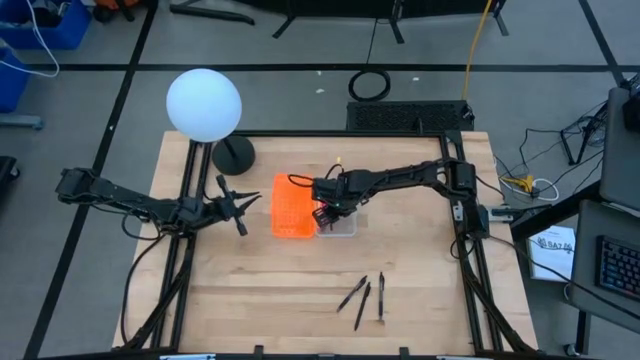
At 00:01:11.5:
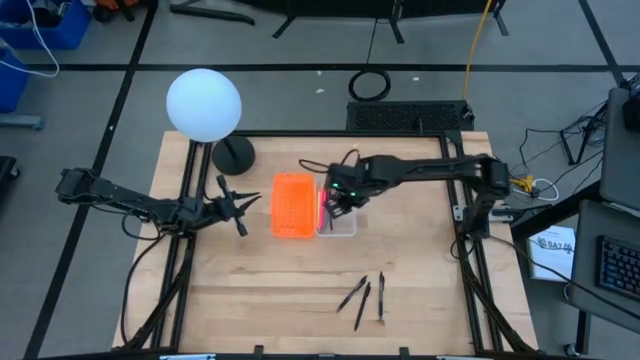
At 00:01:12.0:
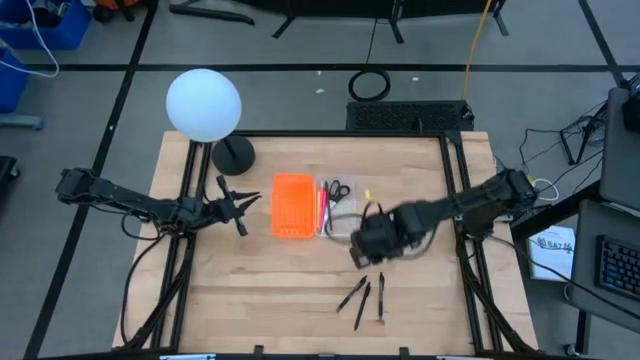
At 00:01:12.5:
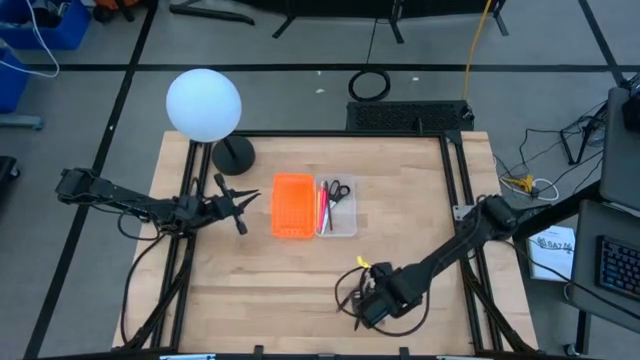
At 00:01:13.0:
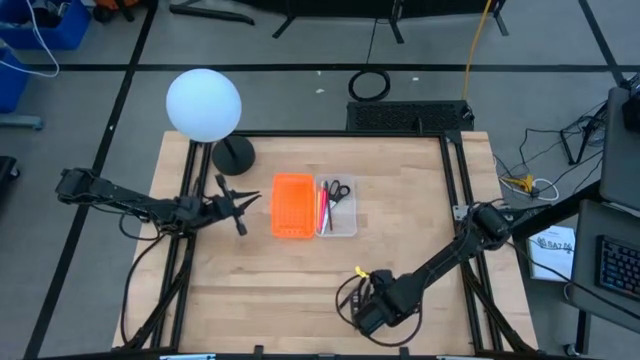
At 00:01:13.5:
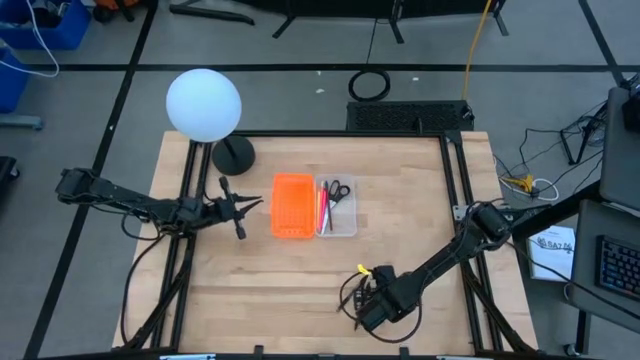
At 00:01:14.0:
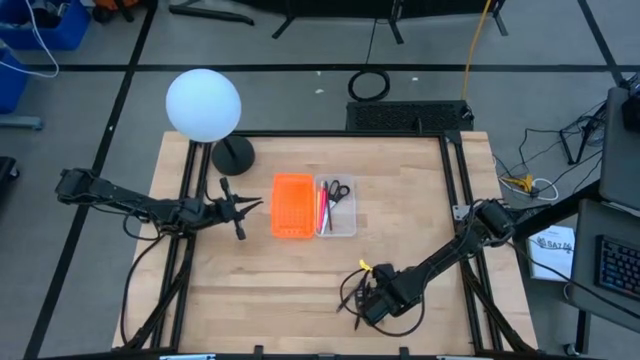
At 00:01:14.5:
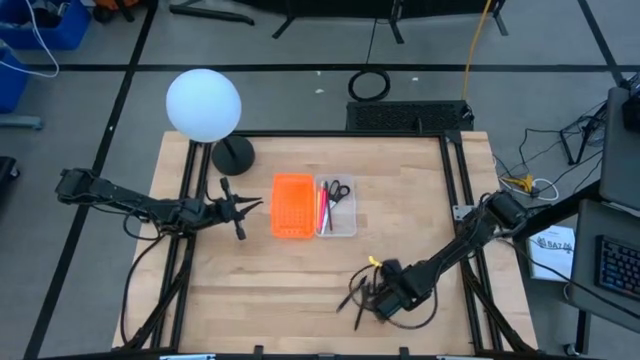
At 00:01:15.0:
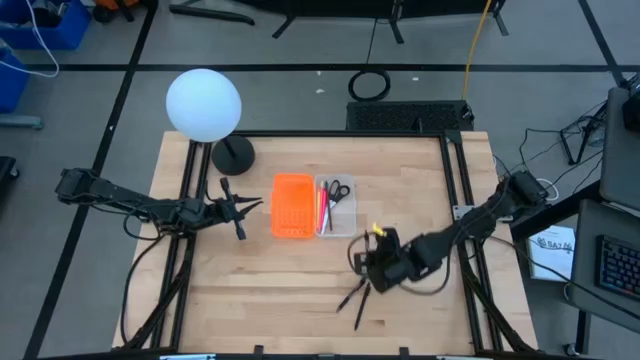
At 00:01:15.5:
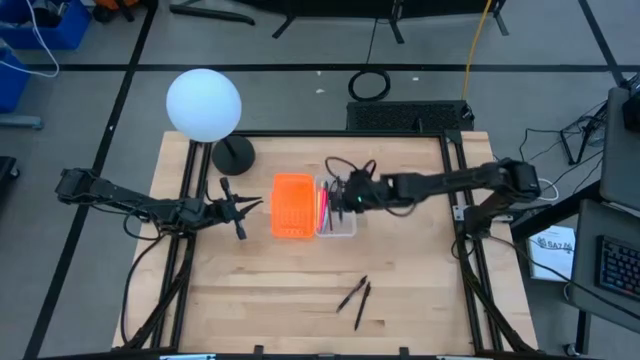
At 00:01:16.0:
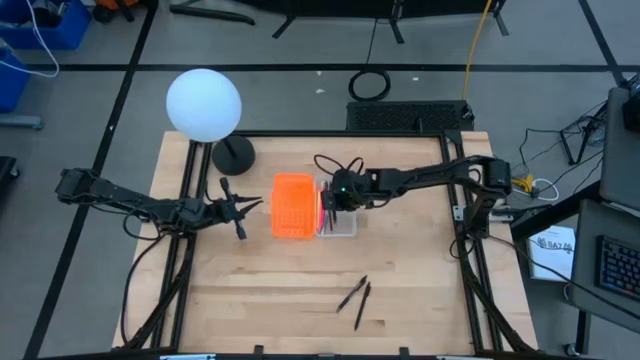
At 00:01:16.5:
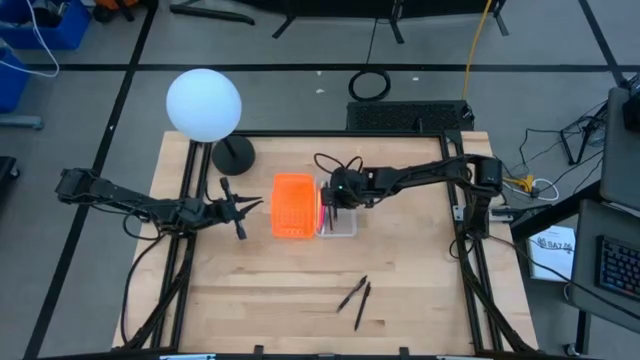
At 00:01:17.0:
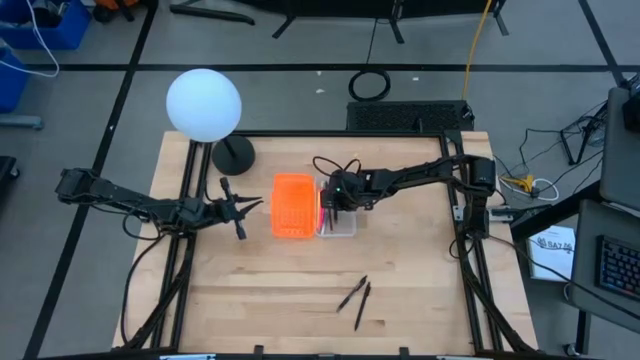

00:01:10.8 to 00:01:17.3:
Task: Pick & place school supplies into a supply box
Put the black pen into the orange supply box

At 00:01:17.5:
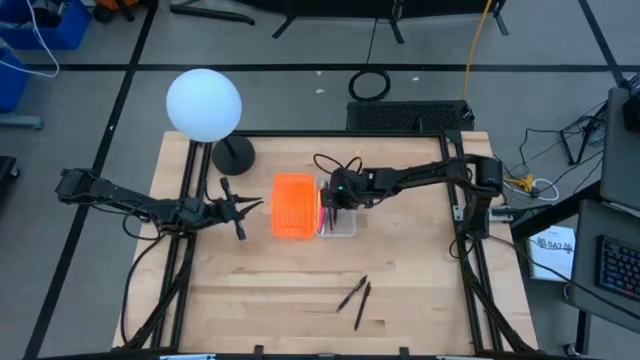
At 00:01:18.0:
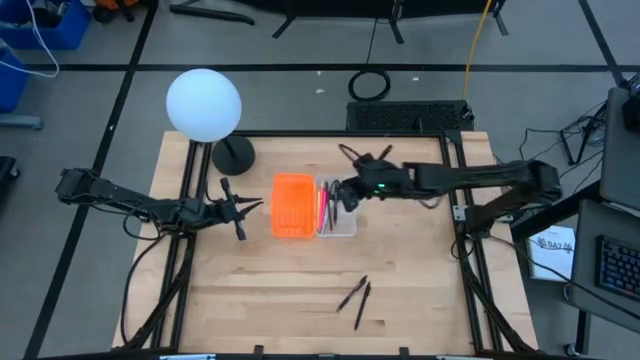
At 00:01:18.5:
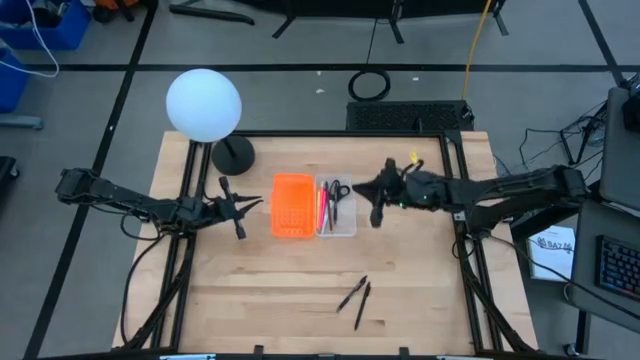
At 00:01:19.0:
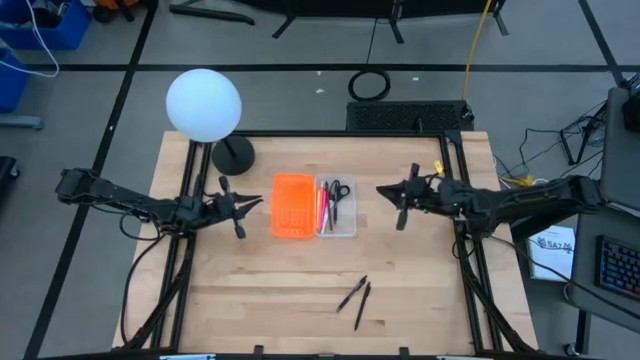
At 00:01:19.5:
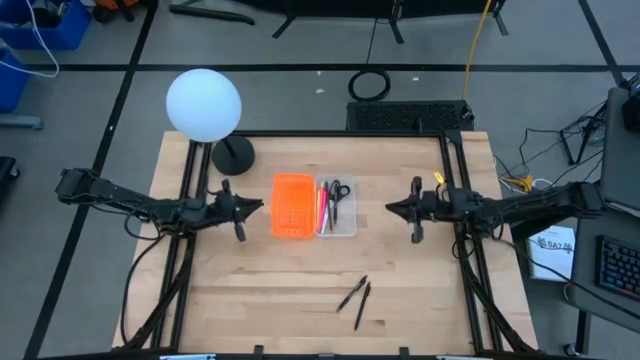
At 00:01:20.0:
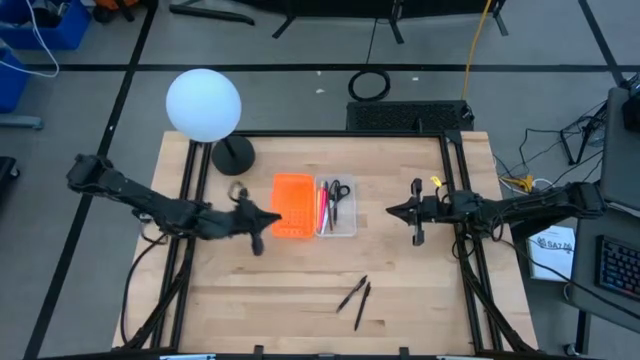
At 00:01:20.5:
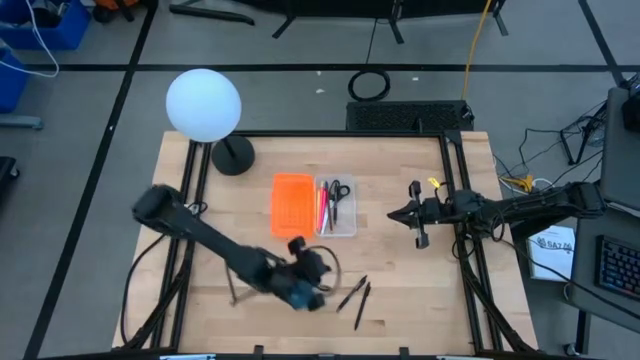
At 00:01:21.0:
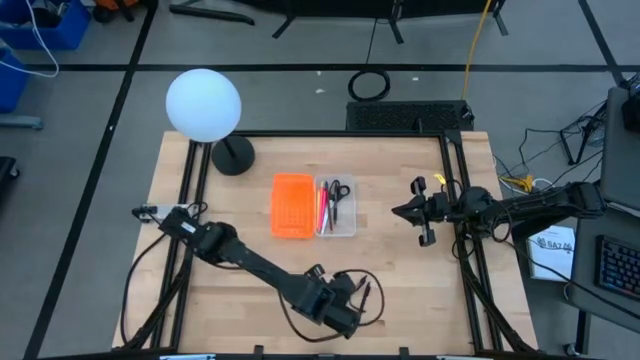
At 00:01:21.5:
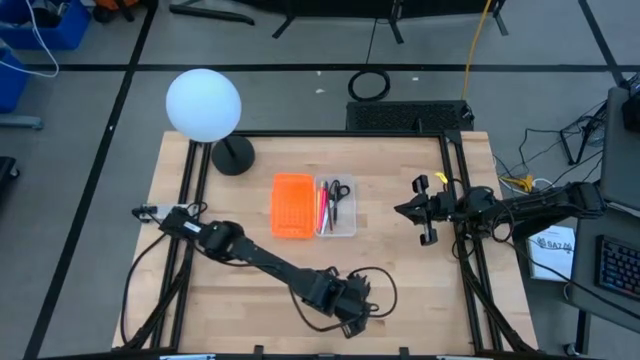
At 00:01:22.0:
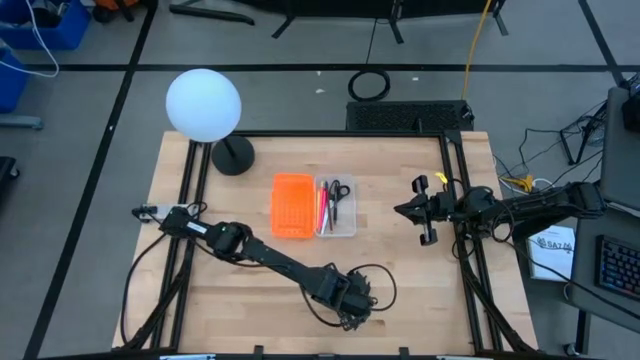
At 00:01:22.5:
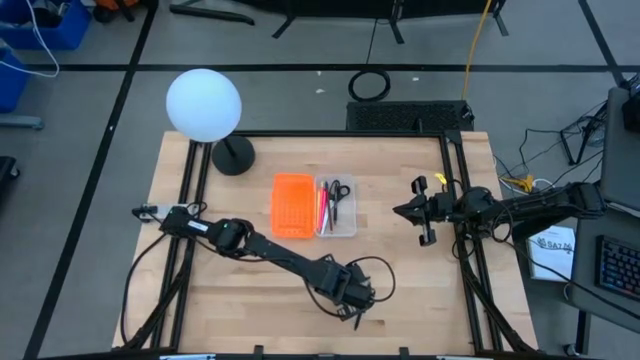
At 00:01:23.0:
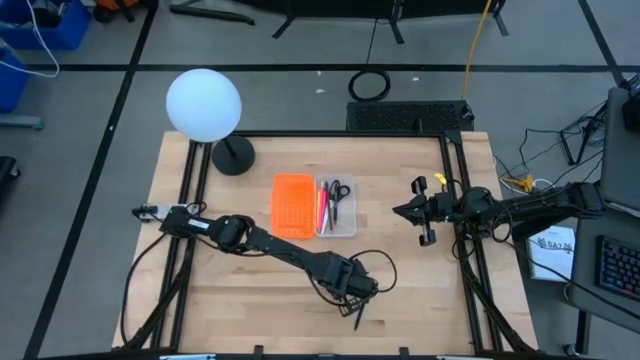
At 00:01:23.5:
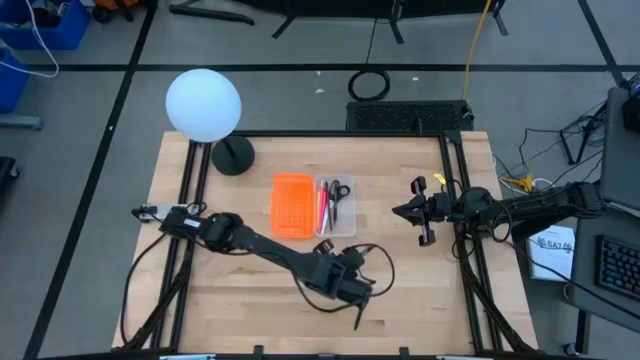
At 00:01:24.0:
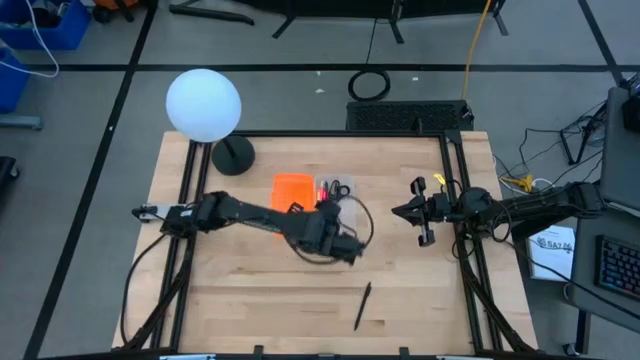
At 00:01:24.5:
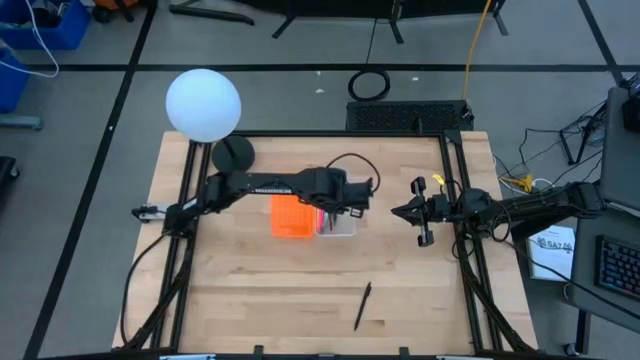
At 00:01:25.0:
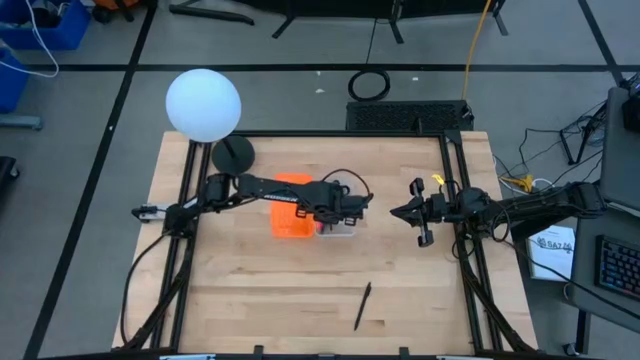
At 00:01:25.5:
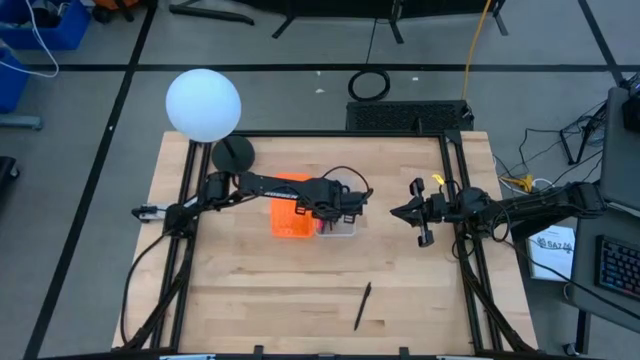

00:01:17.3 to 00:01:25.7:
Put the black pen into the orange supply box

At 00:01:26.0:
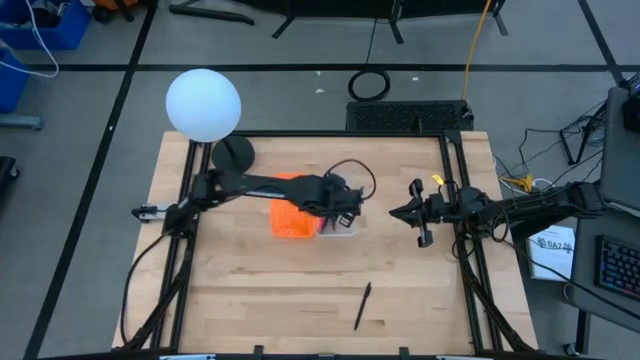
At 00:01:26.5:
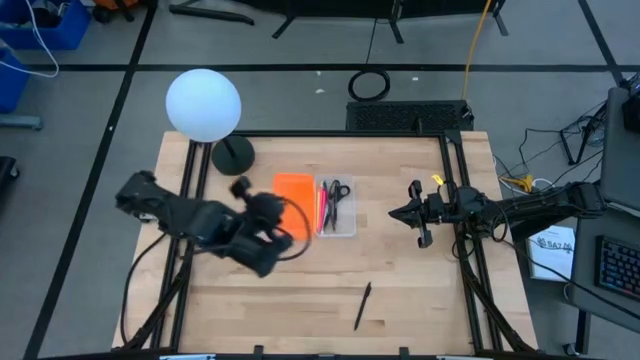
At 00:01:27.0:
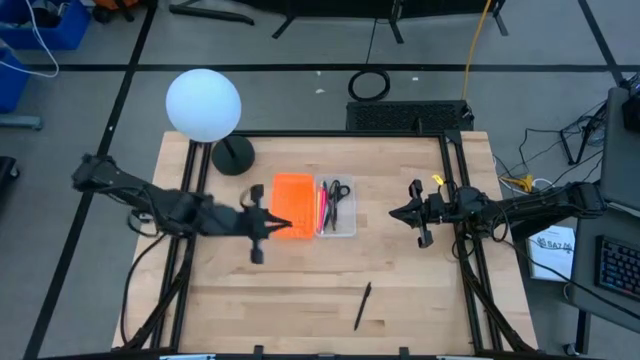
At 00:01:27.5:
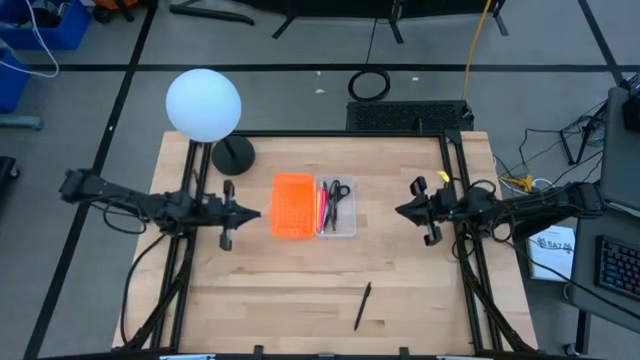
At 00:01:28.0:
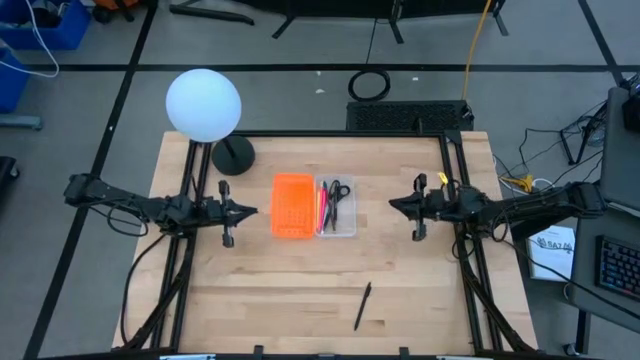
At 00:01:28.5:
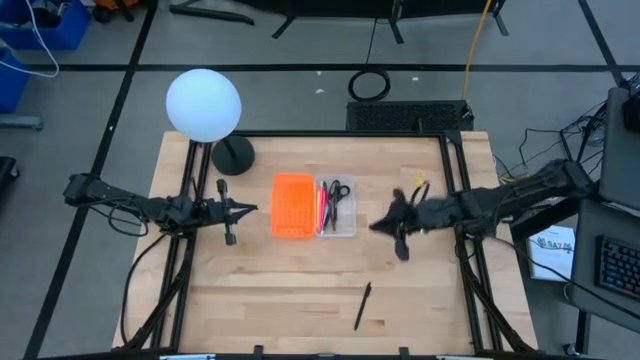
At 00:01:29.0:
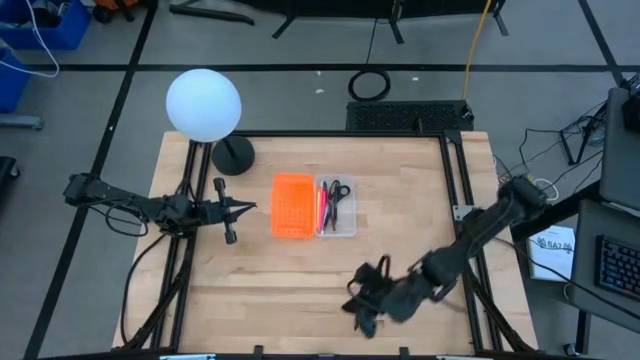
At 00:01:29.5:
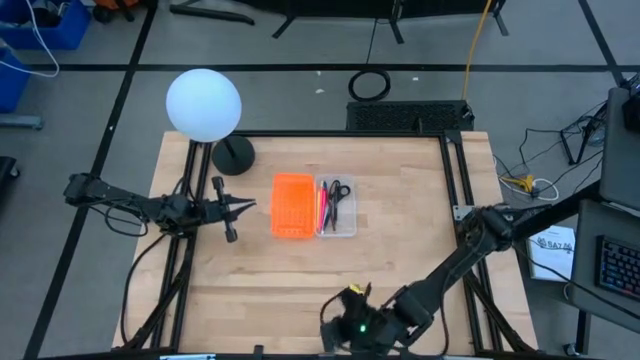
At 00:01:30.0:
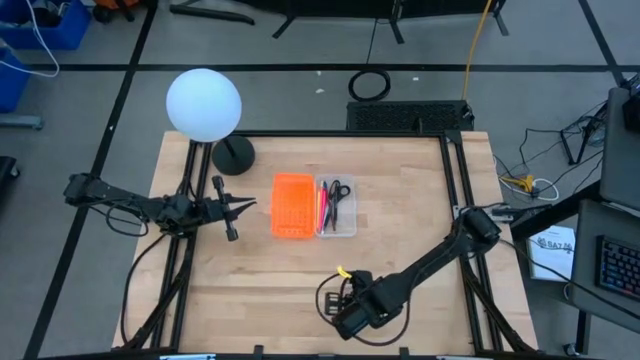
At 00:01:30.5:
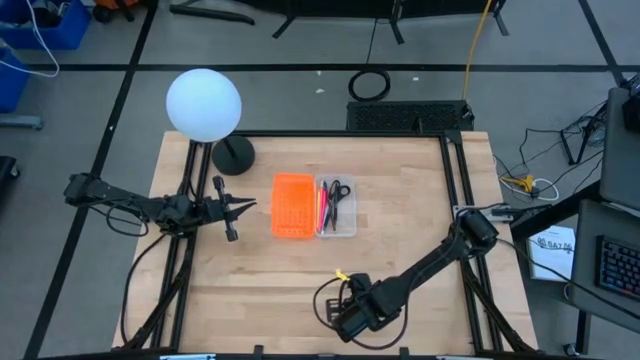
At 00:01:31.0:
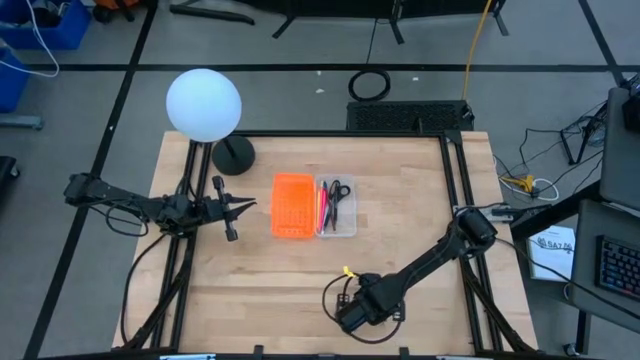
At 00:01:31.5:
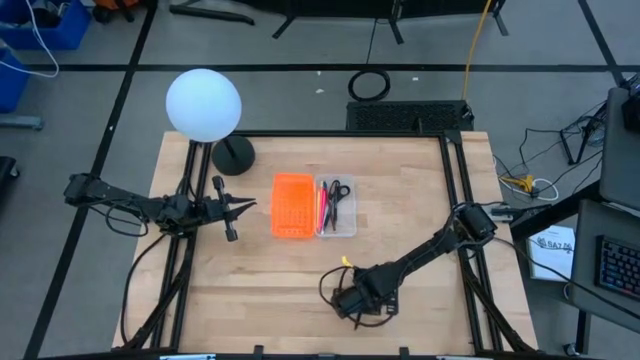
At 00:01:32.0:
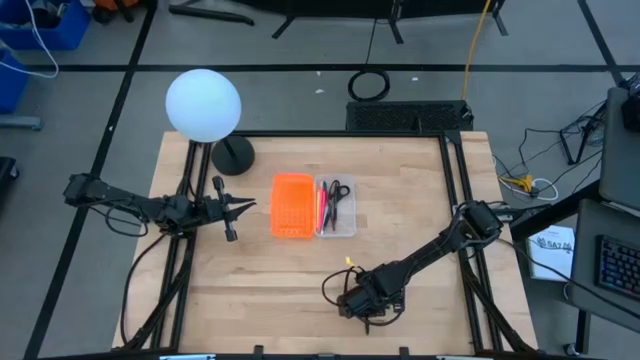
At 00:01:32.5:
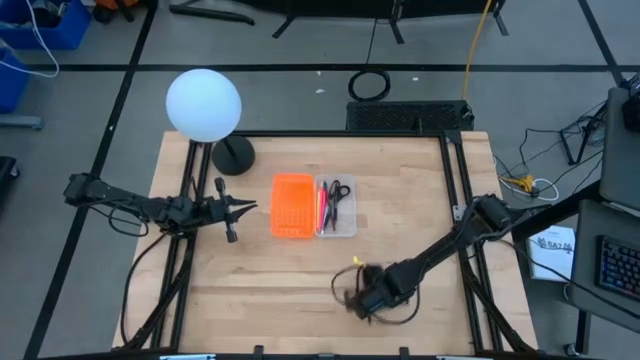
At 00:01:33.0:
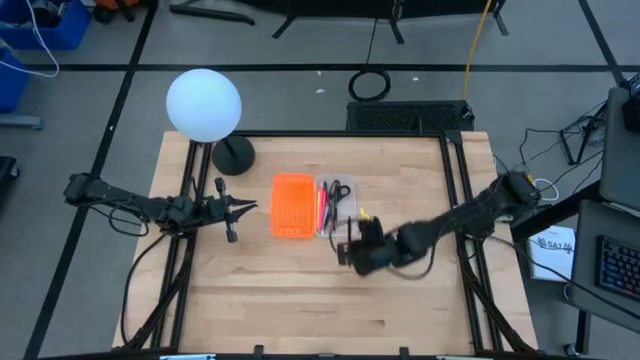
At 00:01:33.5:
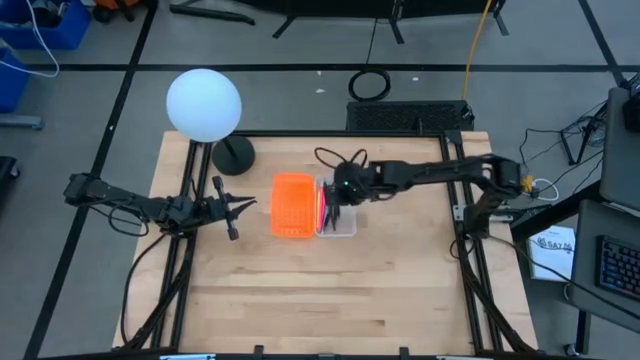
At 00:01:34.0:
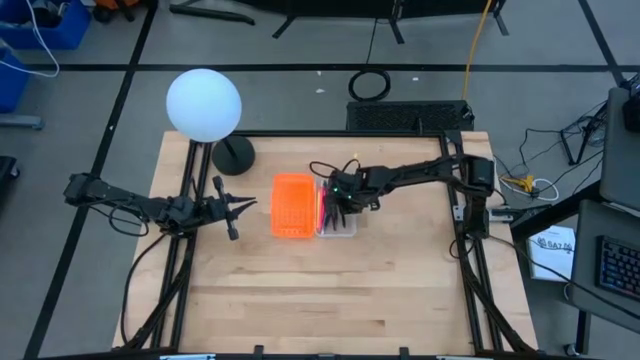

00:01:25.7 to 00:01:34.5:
Put the black pen into the orange supply box
